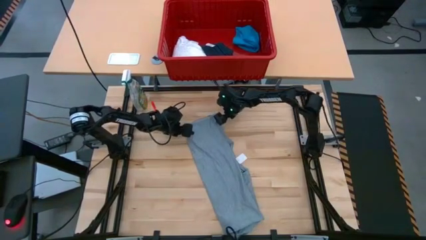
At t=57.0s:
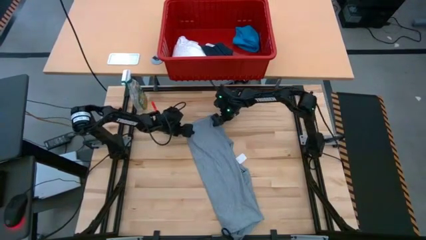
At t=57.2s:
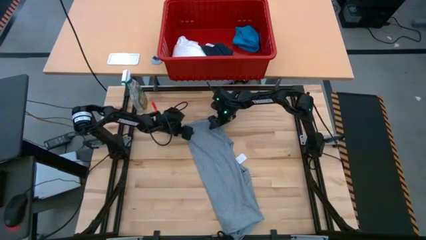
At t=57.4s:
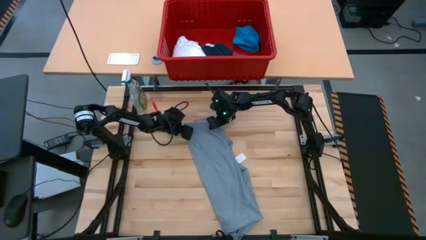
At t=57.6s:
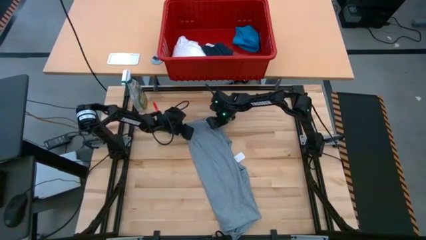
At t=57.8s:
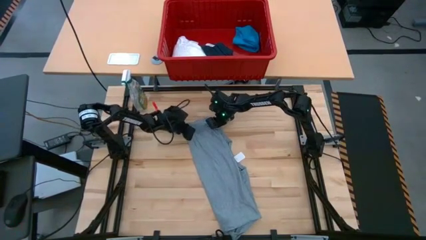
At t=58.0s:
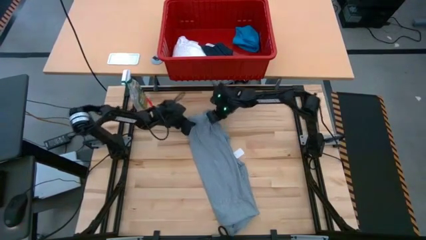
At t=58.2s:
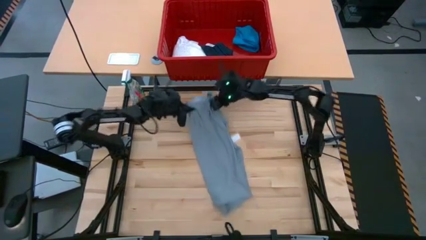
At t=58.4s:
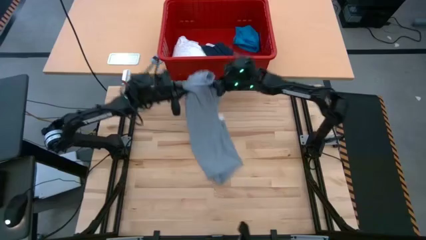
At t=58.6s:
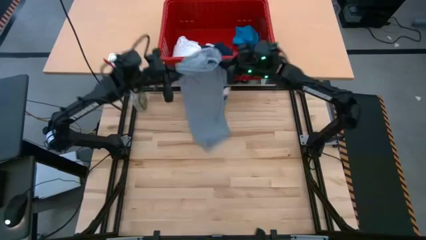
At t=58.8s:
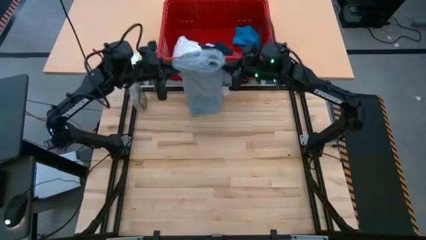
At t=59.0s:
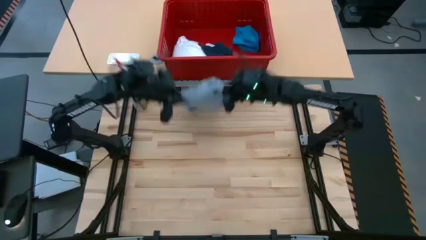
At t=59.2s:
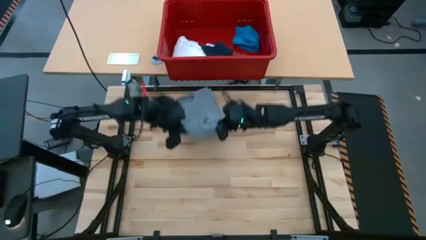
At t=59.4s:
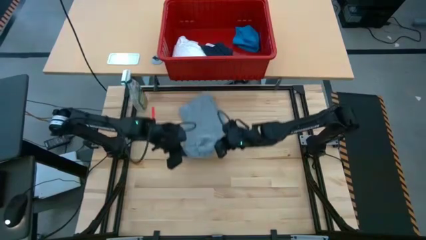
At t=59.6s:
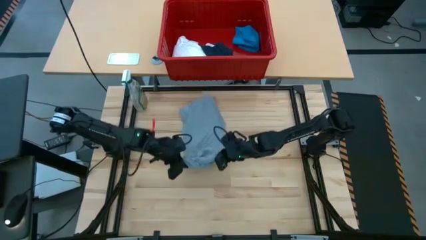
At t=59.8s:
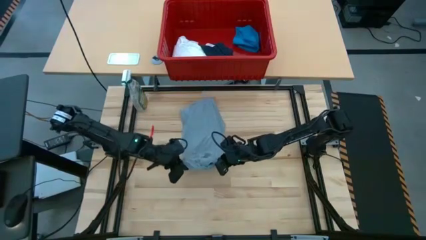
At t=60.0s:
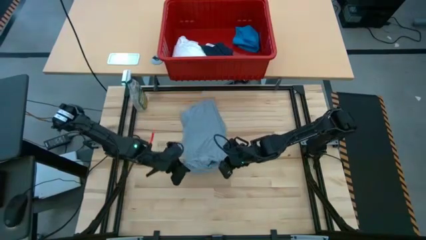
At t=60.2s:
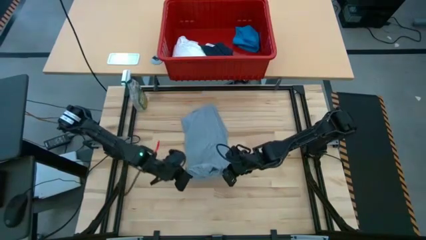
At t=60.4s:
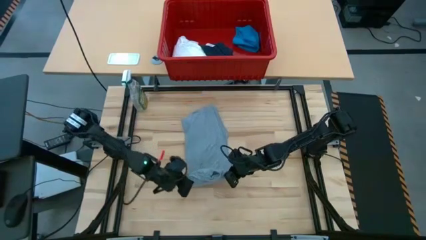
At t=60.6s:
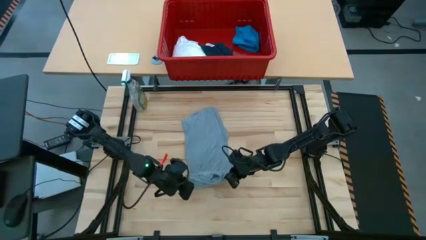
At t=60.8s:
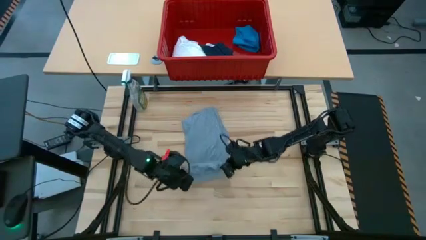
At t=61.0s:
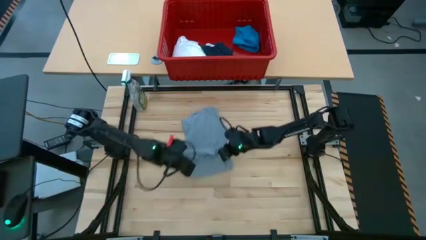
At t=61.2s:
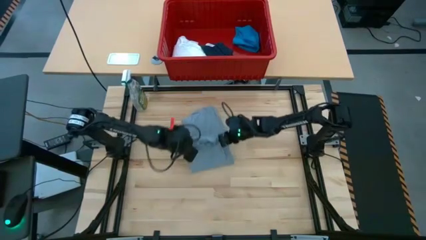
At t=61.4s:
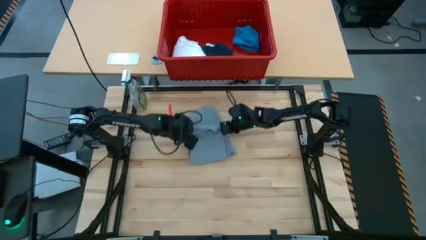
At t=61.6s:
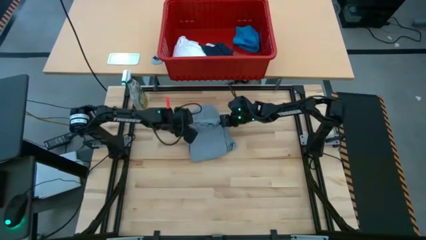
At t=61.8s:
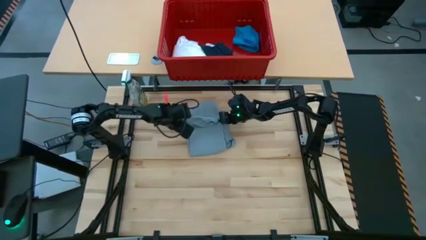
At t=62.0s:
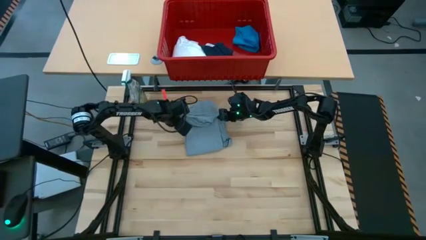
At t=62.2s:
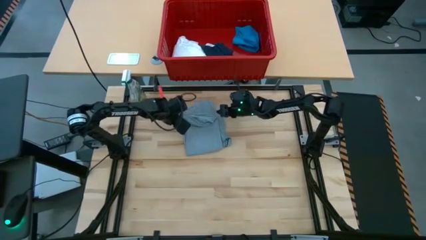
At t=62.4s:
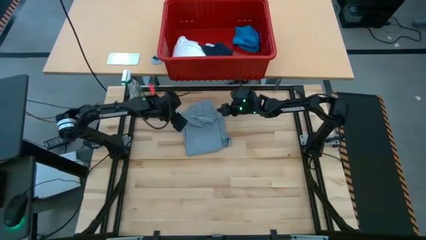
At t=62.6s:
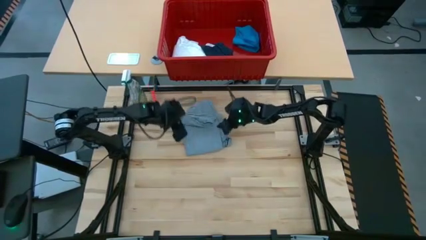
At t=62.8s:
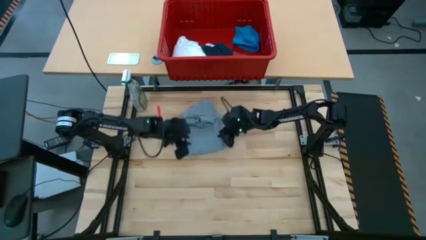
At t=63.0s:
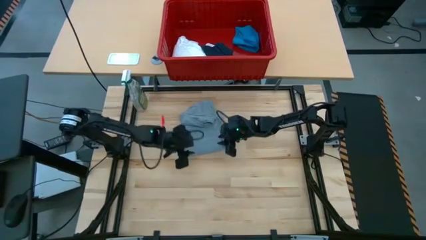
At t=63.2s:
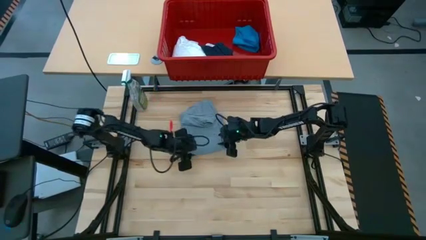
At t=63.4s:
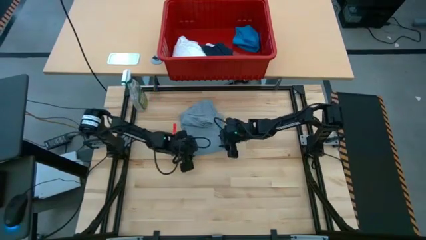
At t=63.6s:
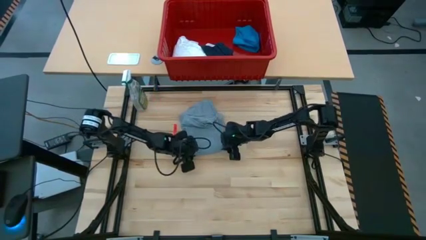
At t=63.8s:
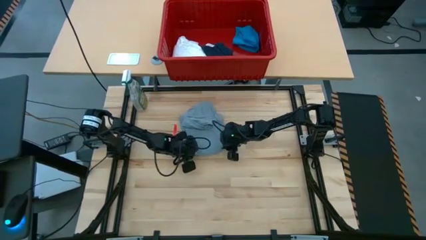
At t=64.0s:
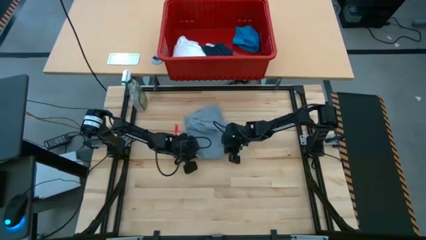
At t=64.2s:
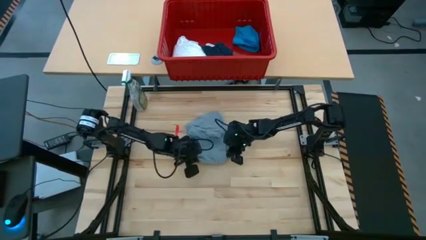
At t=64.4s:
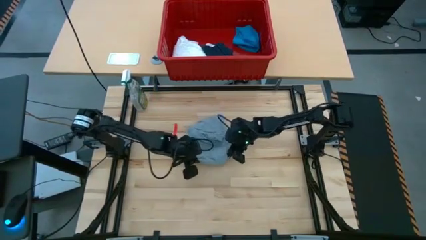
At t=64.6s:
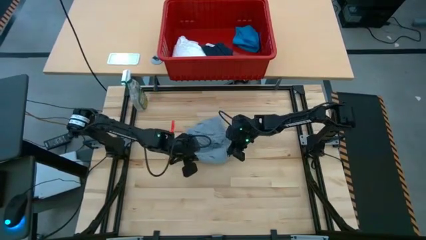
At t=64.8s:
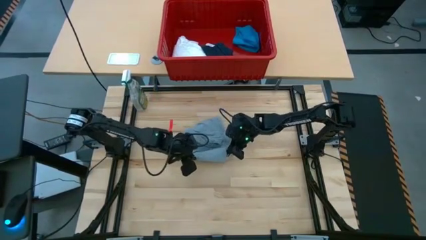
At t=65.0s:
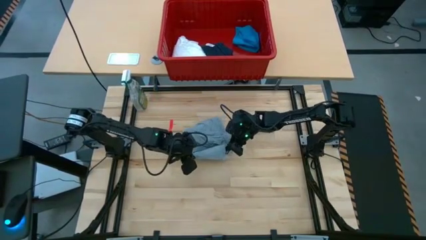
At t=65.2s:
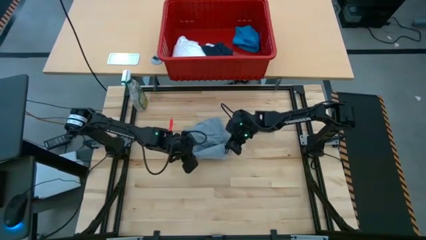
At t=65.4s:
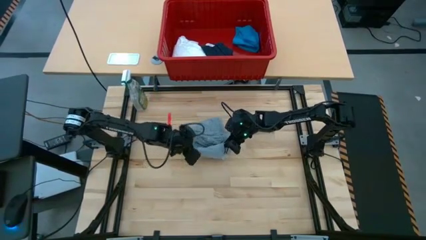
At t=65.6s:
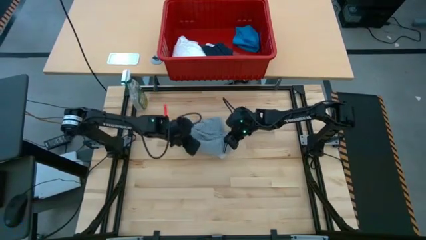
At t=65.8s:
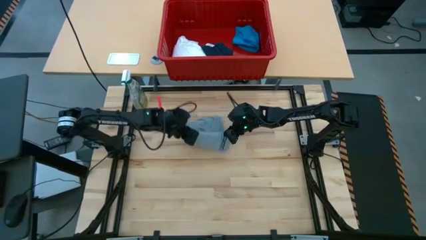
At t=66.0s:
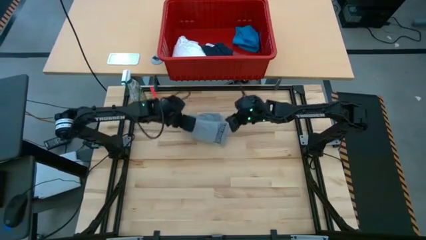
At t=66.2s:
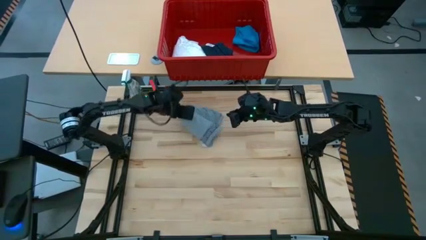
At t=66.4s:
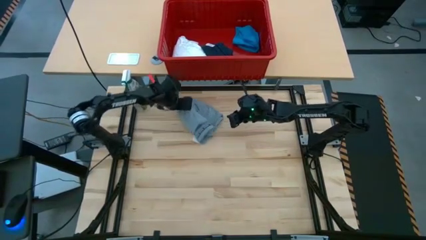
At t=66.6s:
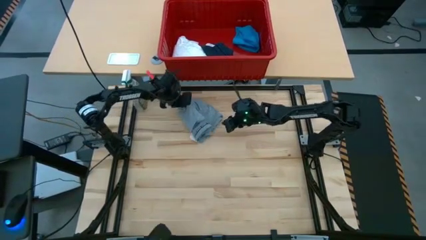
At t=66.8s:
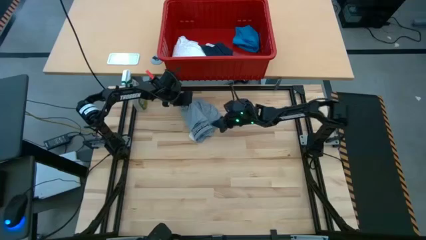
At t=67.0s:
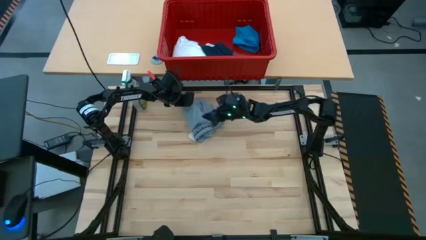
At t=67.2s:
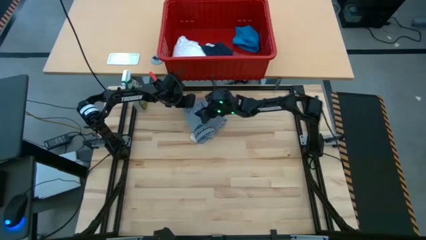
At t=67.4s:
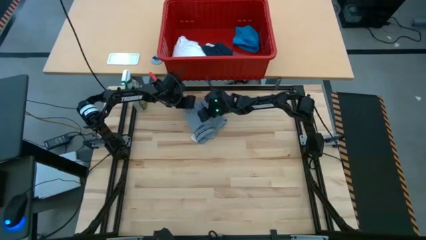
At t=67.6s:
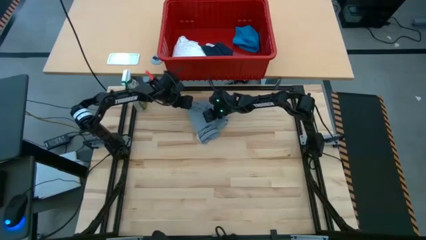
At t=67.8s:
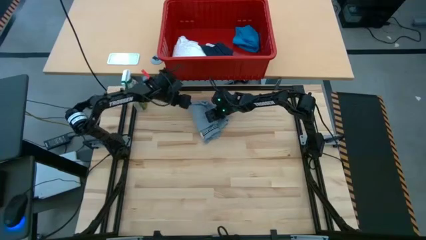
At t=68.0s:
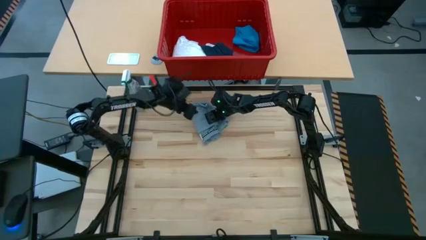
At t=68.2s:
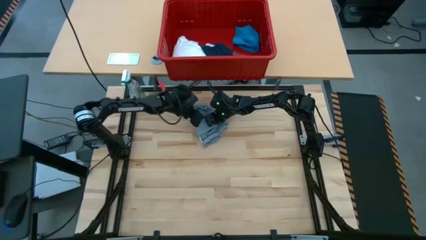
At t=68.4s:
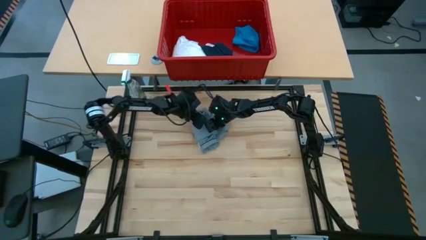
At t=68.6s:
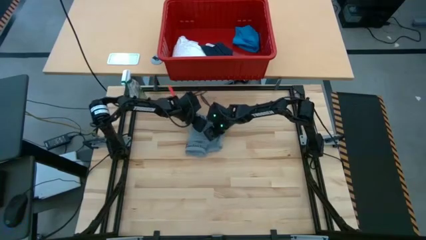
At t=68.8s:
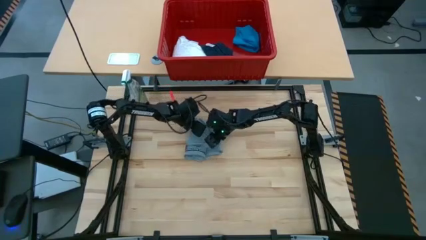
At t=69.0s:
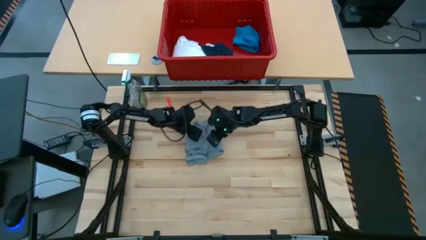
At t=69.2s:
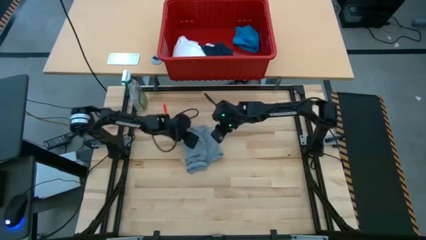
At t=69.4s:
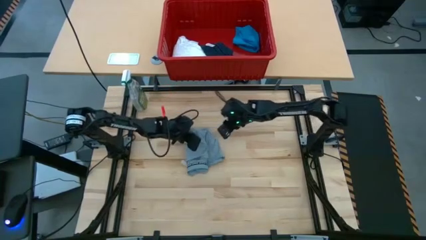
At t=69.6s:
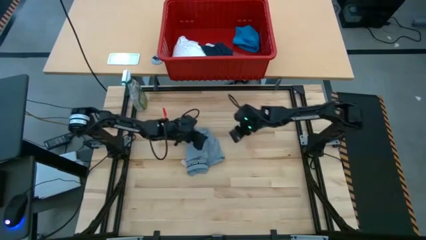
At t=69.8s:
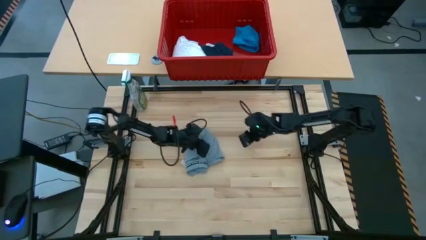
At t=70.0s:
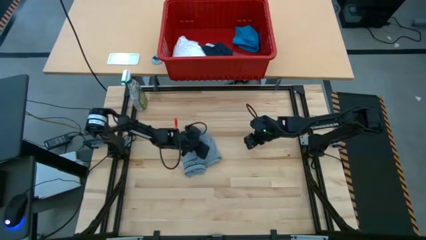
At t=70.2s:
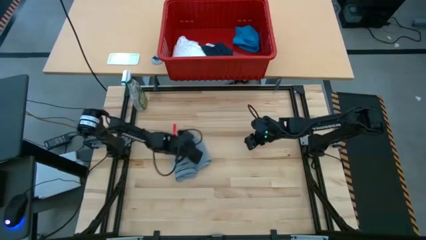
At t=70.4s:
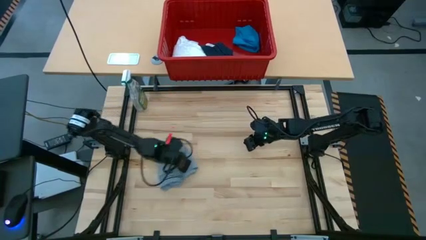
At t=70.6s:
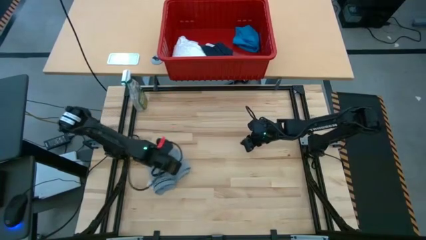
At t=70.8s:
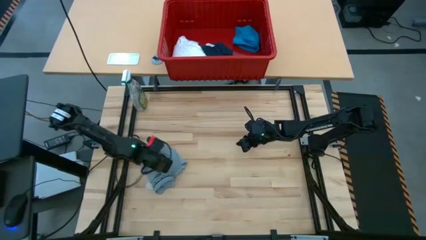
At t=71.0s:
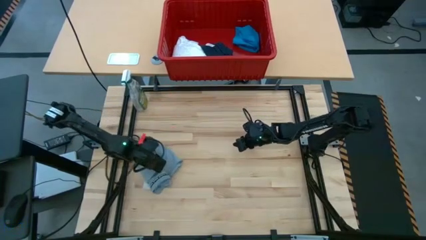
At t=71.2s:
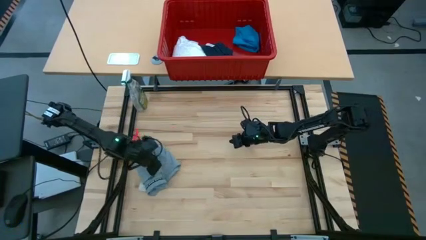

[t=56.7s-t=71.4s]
Task: Fold laundry
Fold the gray shirt

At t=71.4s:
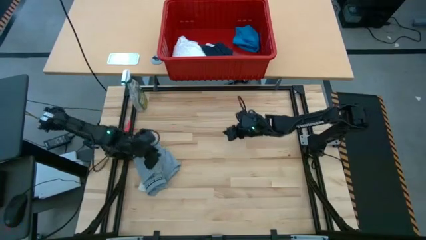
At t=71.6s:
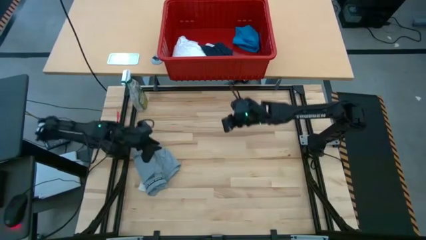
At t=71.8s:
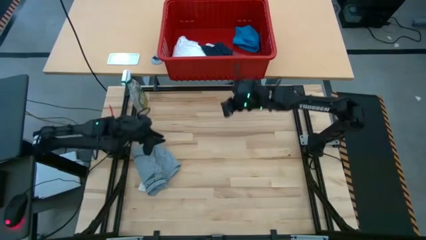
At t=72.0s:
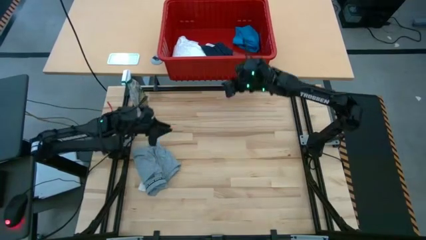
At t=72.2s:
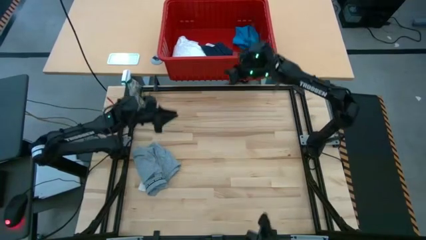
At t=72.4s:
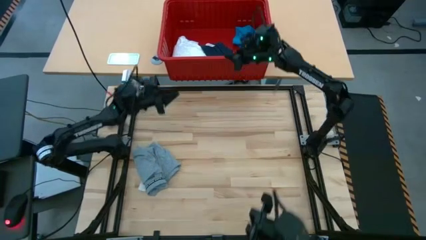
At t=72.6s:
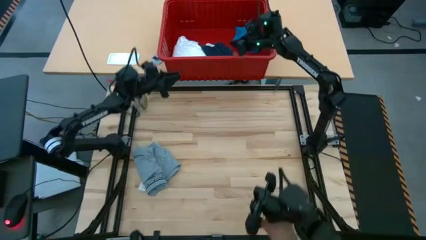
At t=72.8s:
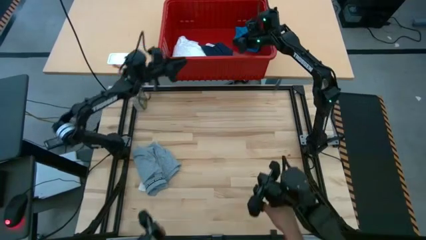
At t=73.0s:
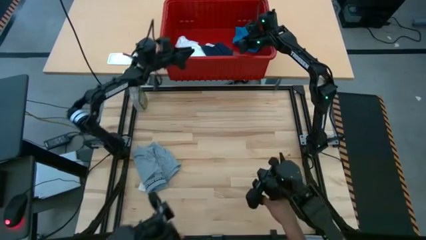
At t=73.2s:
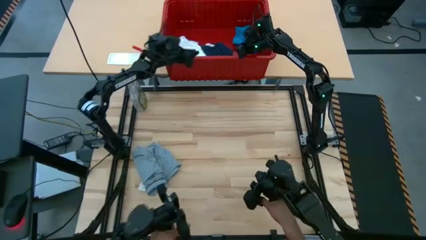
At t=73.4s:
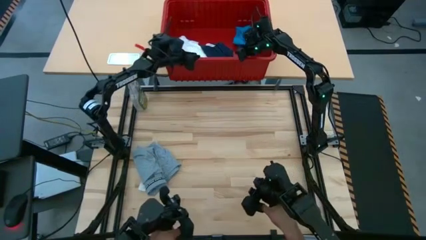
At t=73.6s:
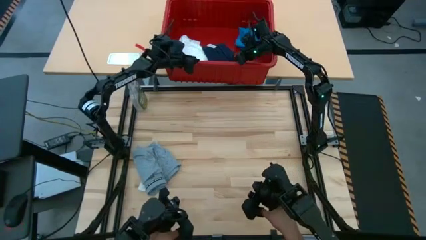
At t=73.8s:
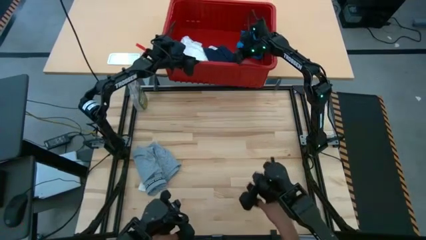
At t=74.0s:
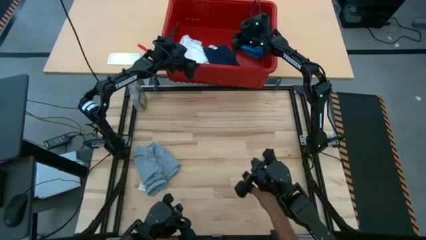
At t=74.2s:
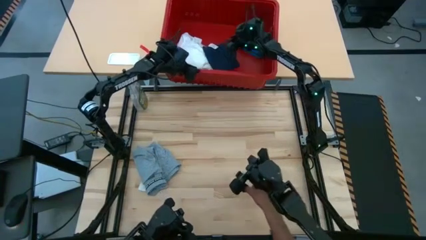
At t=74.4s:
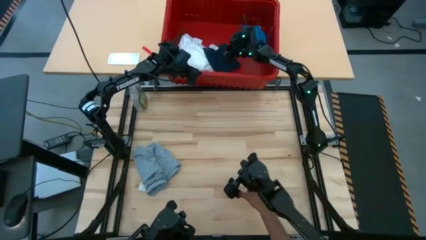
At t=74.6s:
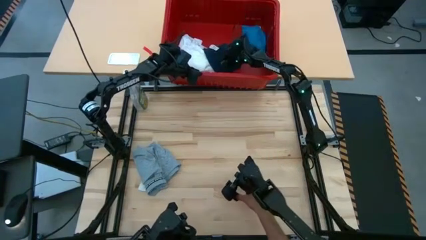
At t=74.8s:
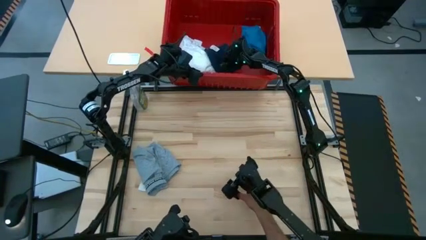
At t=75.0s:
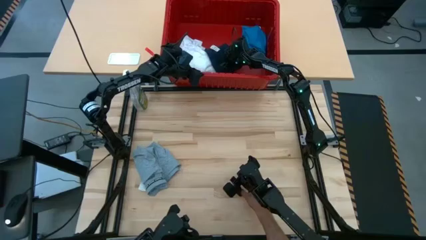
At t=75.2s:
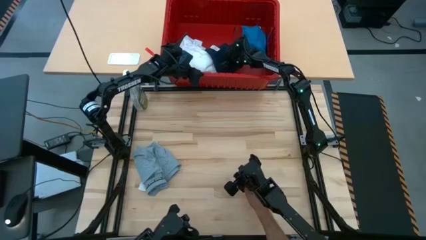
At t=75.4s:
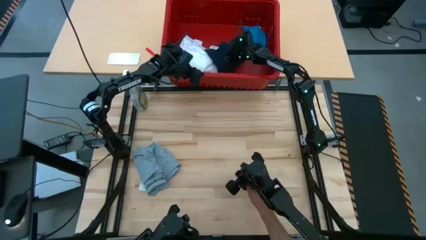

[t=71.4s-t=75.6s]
Remove the black pants from the red laundry bin
